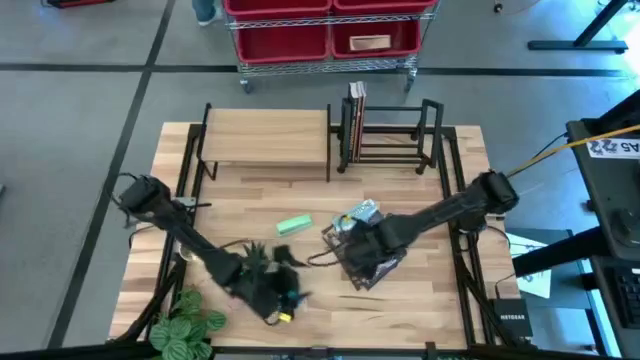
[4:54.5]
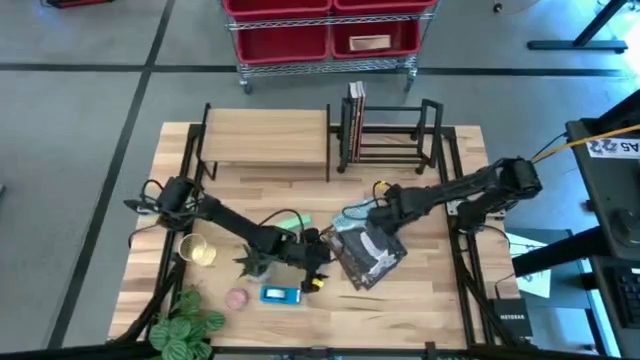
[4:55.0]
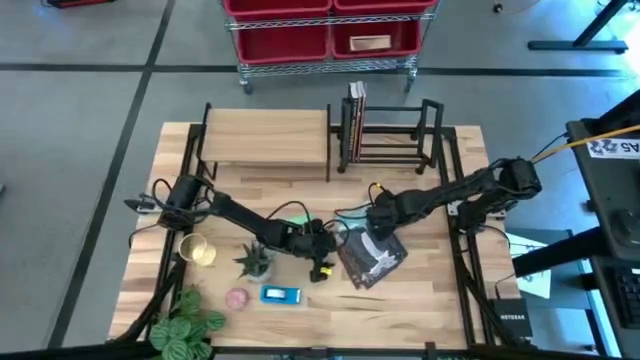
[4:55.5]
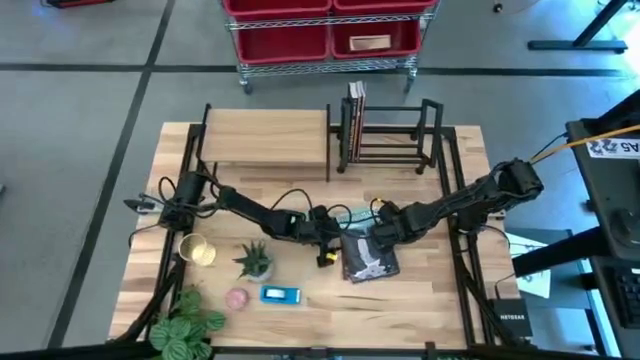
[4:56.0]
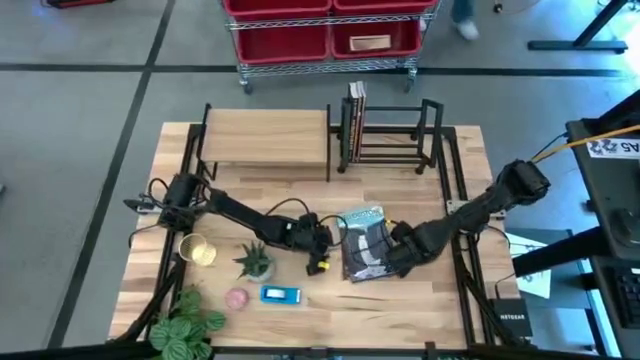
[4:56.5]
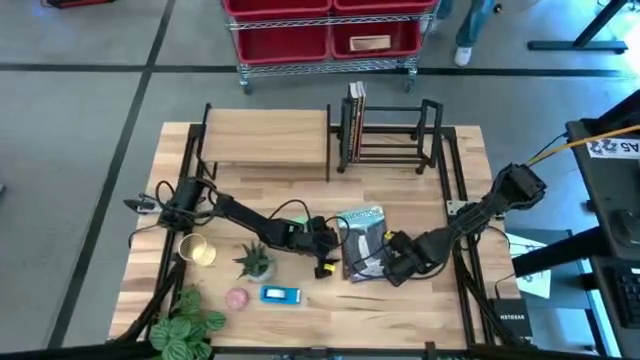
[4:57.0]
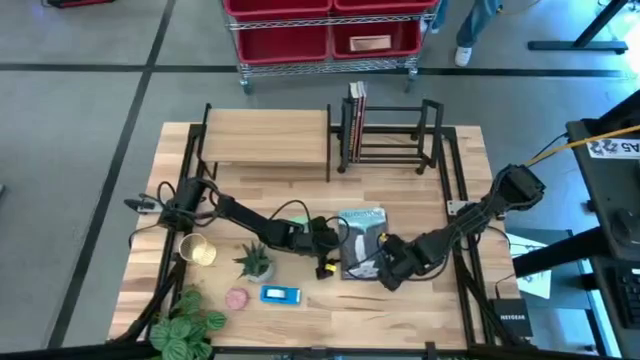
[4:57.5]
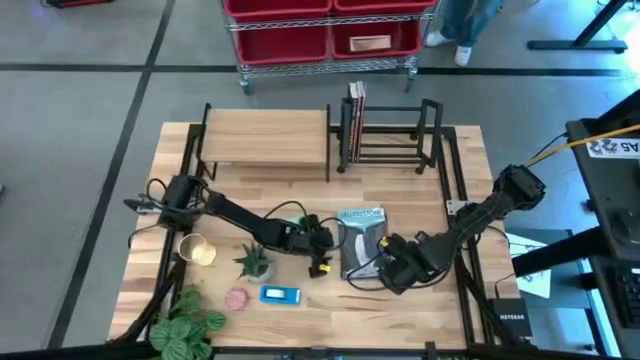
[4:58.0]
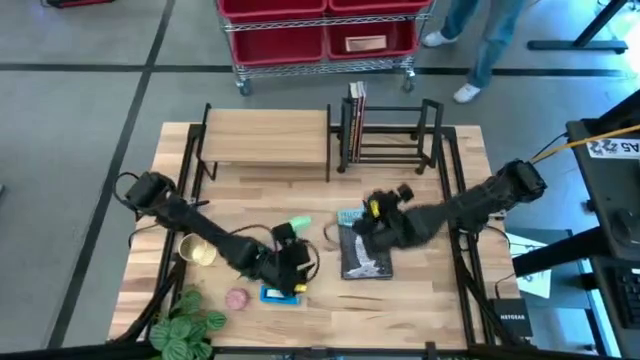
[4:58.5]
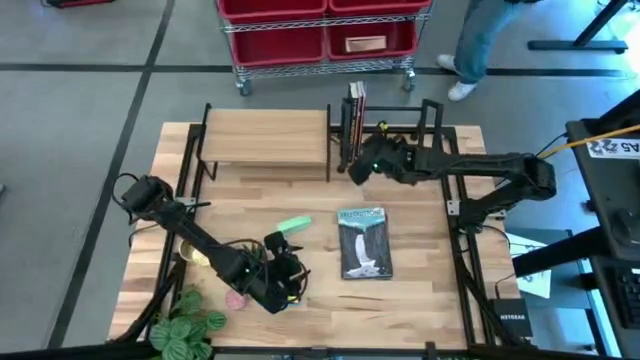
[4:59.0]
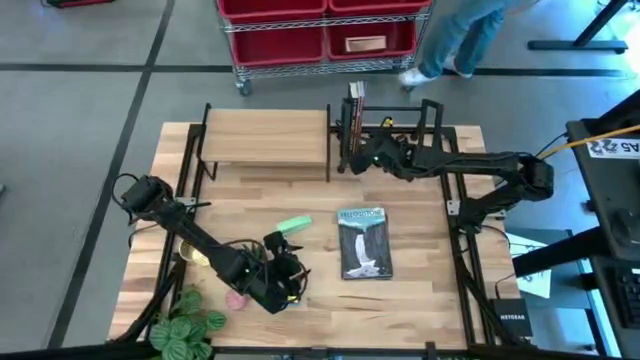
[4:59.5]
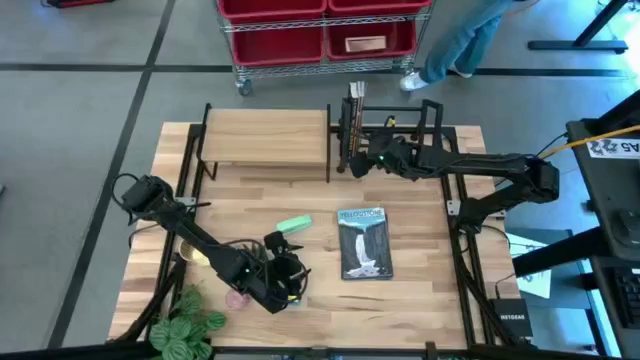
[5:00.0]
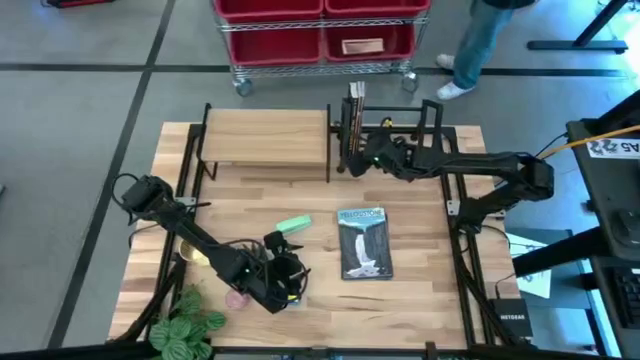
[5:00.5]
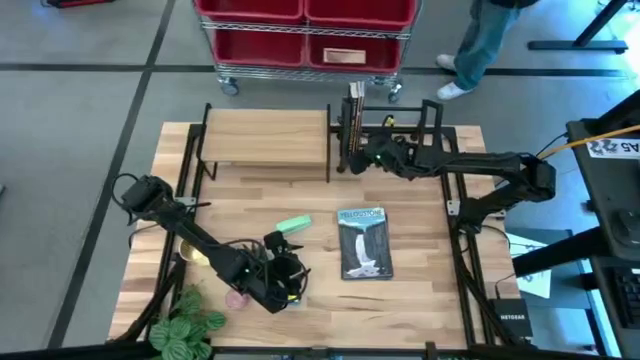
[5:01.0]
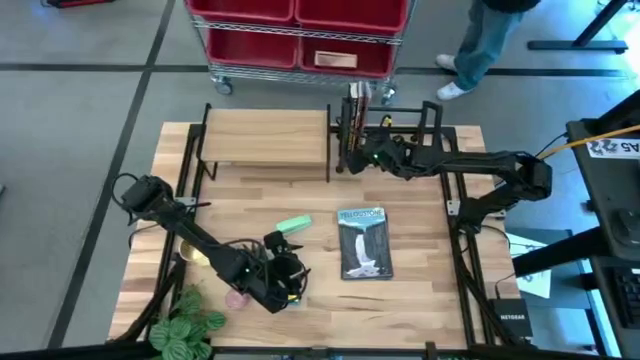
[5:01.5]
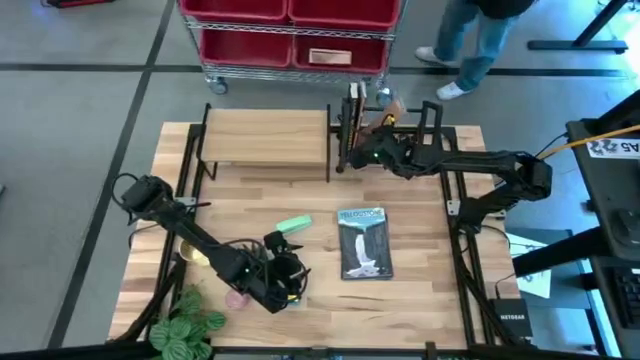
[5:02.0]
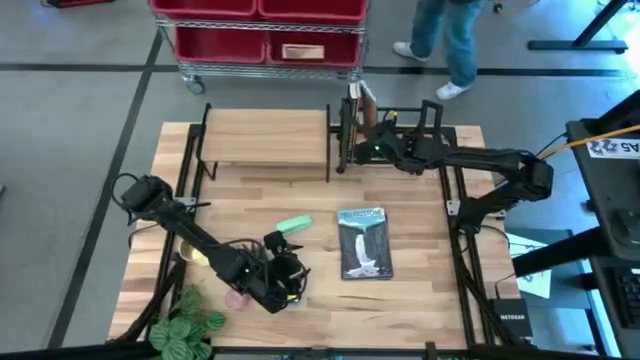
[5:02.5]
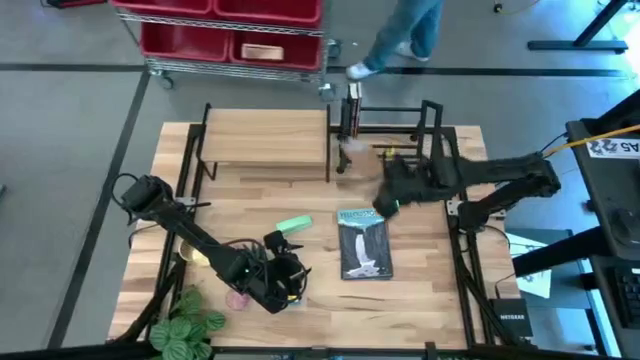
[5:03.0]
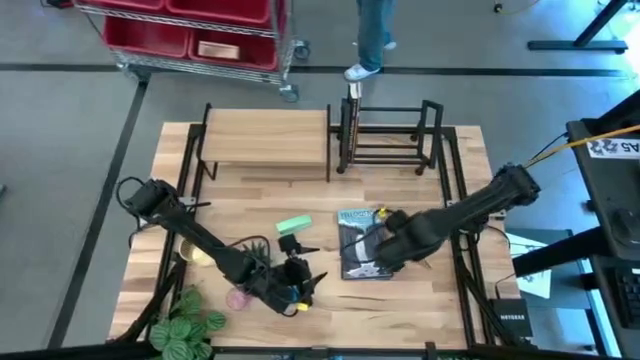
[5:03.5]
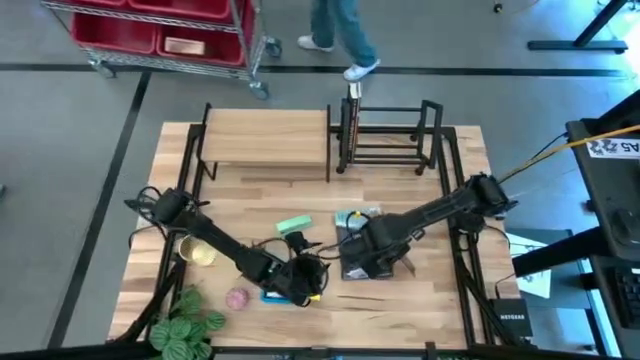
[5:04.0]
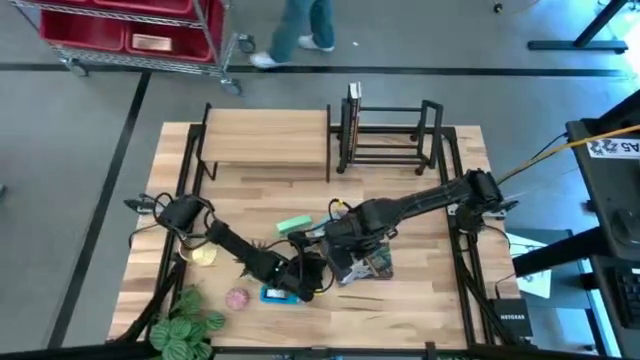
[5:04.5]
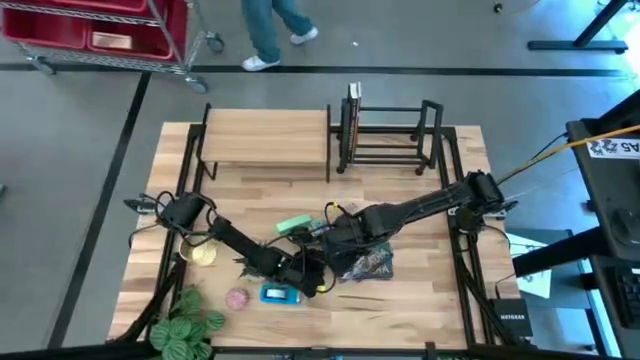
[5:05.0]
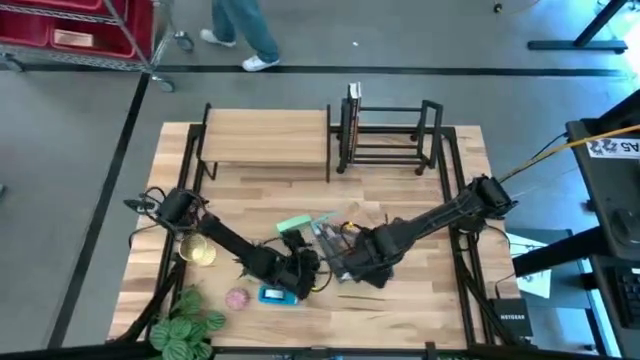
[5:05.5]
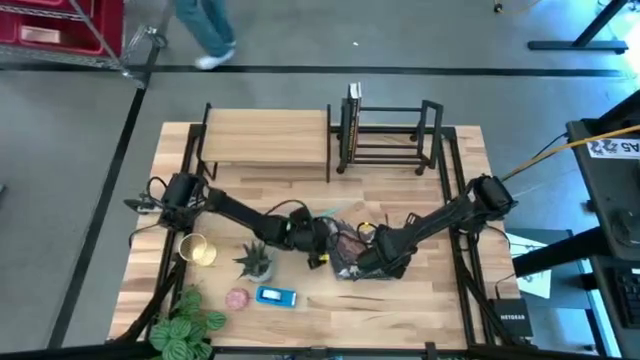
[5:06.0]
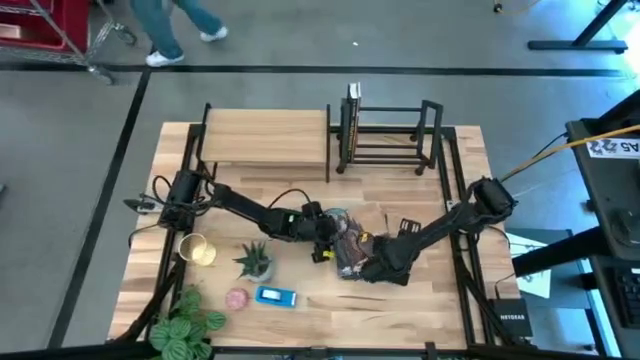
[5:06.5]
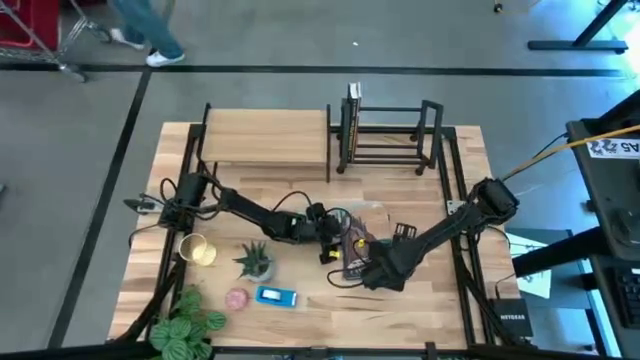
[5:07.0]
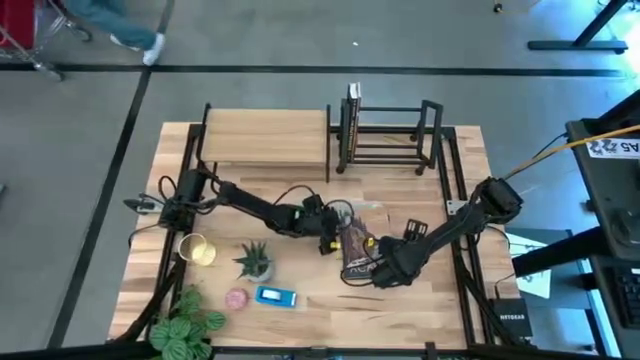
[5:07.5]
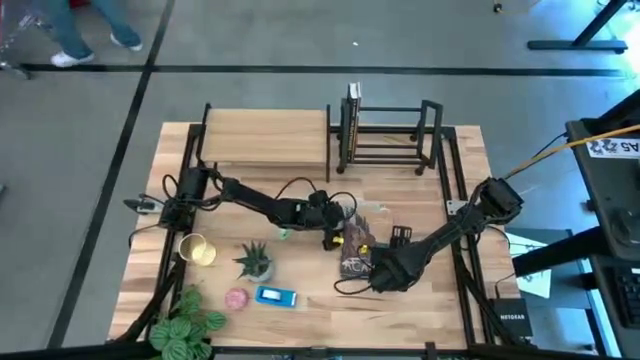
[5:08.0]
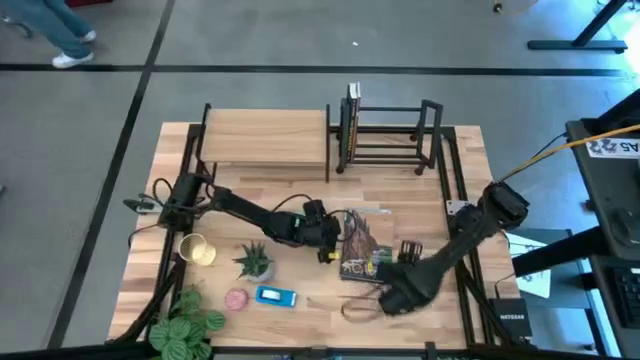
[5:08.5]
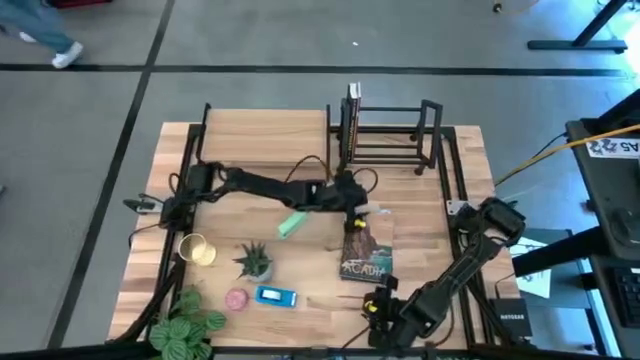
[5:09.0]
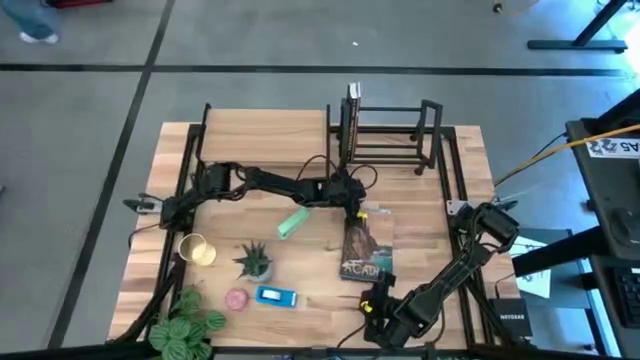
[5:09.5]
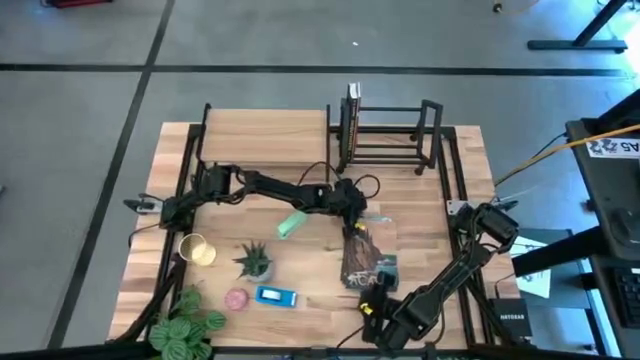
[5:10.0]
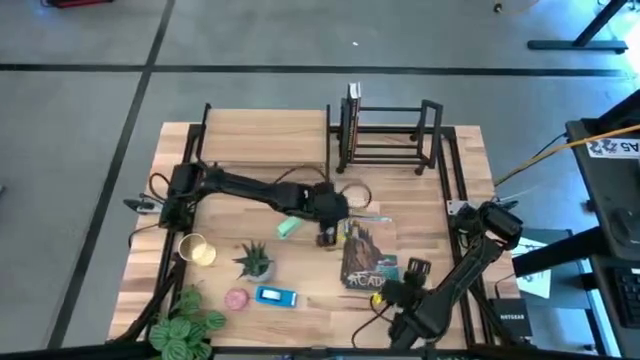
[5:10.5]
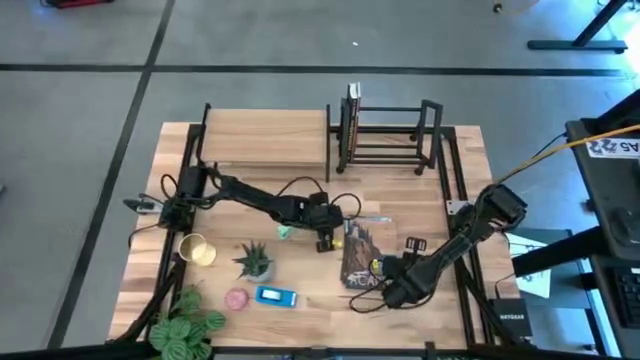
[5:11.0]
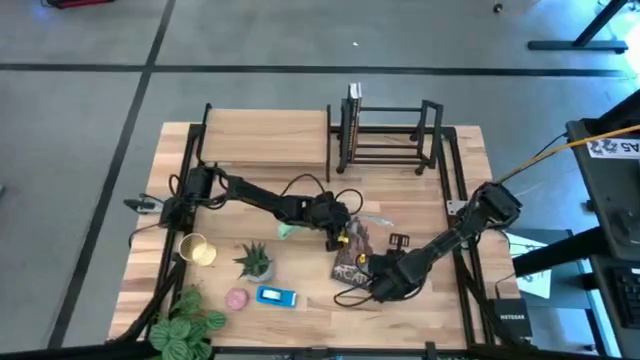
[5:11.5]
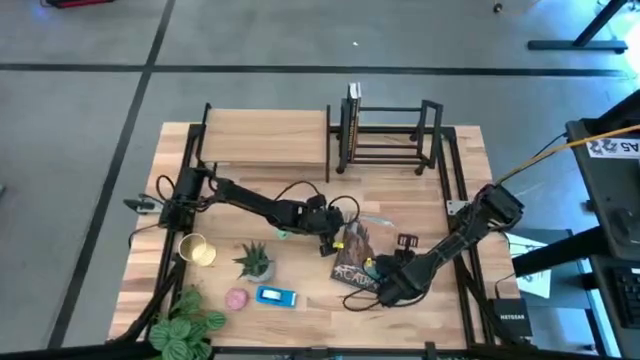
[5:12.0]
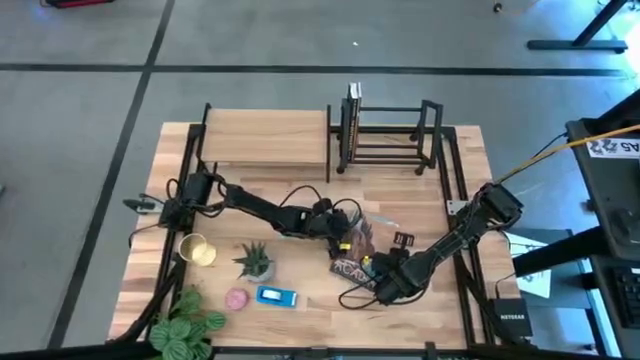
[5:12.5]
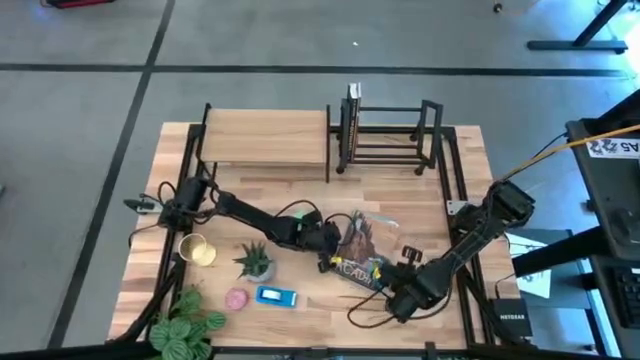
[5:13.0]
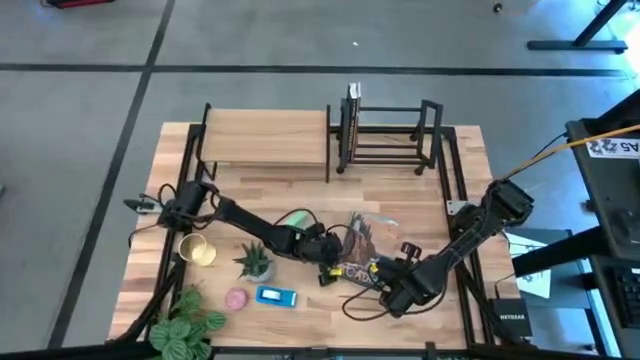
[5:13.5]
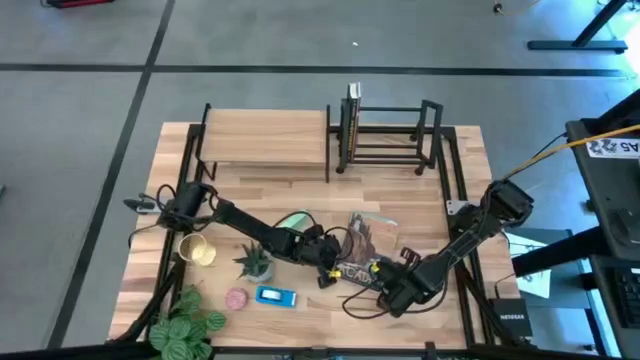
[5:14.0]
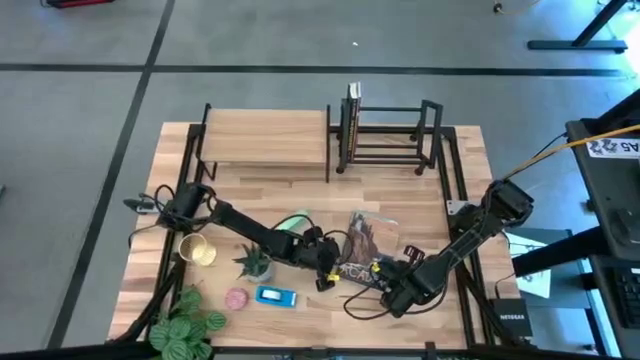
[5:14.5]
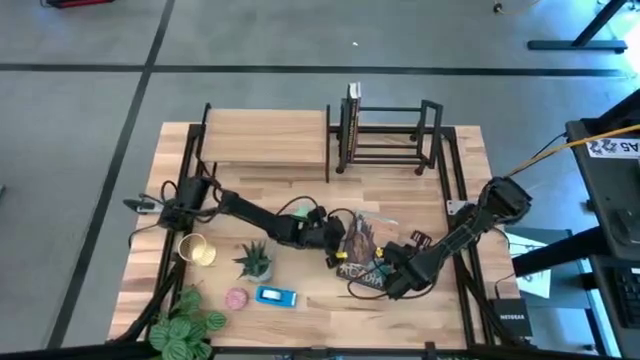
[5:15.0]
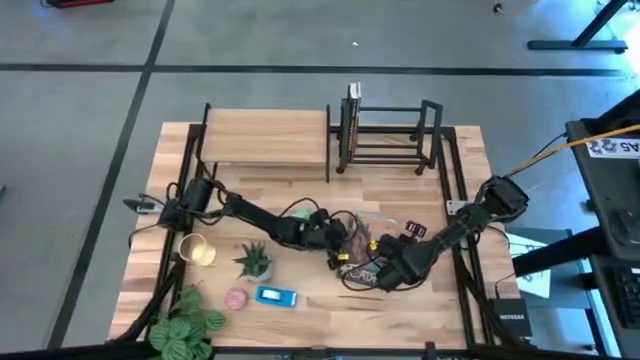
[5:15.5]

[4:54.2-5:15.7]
Task: Stock shelves
Remove the brown blue book from the bookshelf
